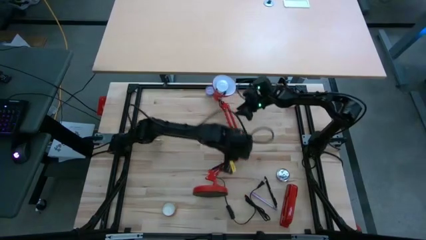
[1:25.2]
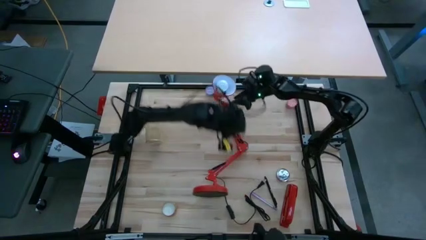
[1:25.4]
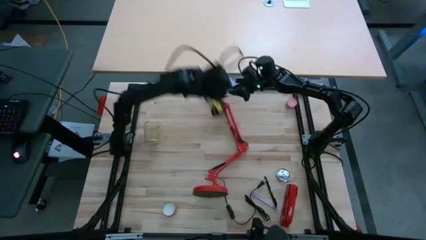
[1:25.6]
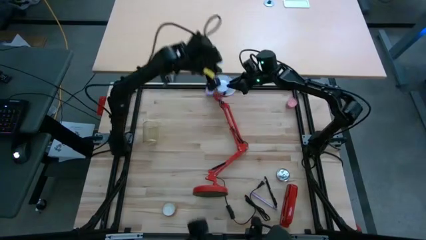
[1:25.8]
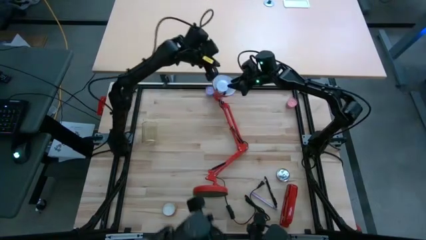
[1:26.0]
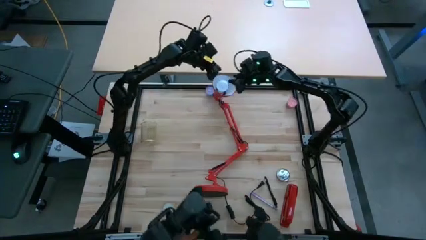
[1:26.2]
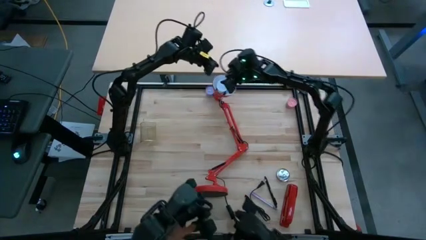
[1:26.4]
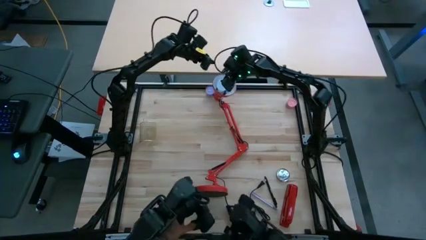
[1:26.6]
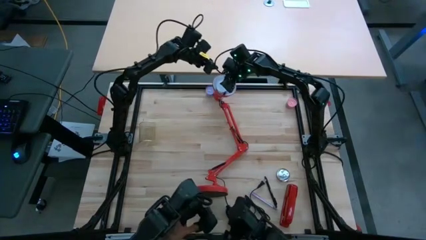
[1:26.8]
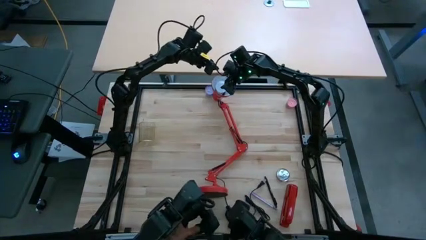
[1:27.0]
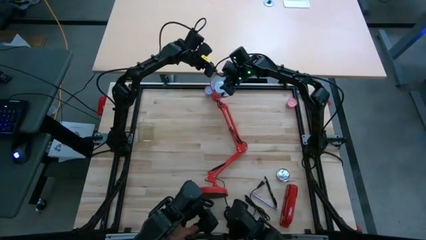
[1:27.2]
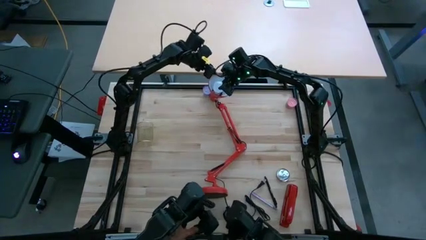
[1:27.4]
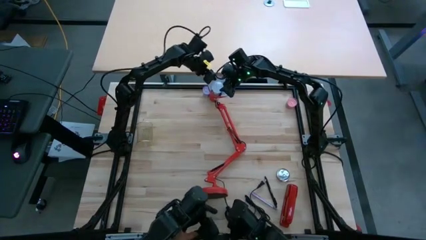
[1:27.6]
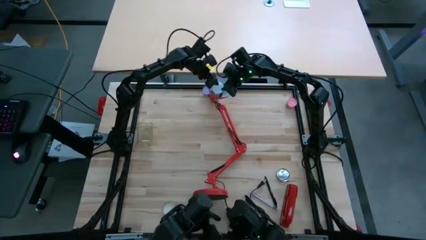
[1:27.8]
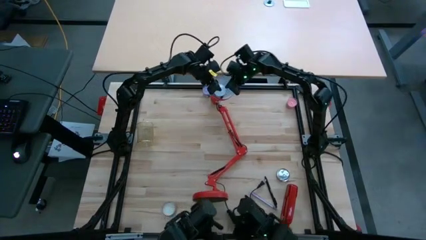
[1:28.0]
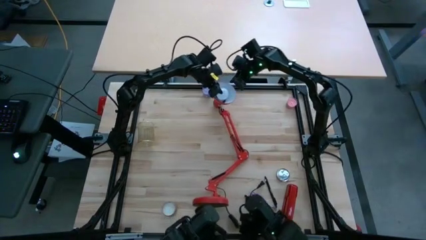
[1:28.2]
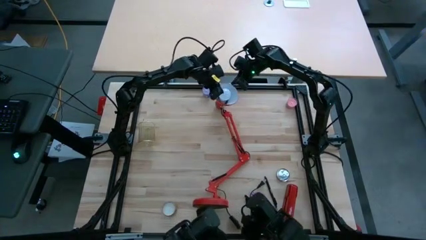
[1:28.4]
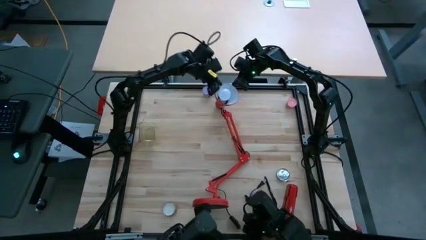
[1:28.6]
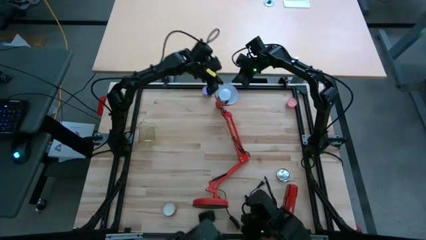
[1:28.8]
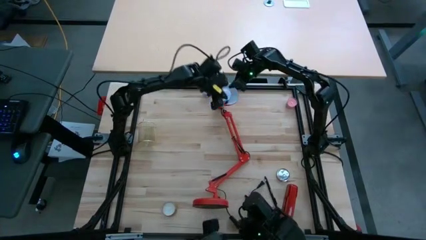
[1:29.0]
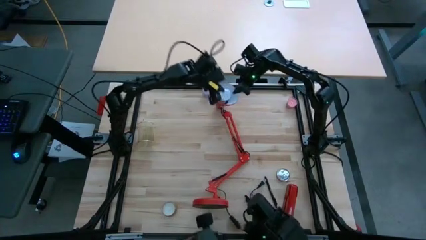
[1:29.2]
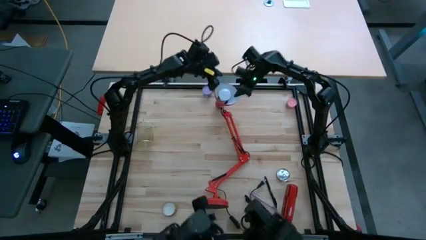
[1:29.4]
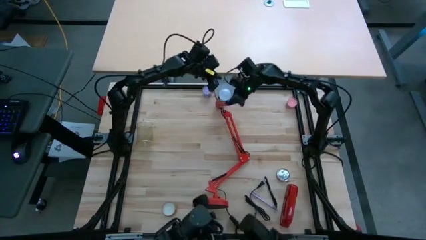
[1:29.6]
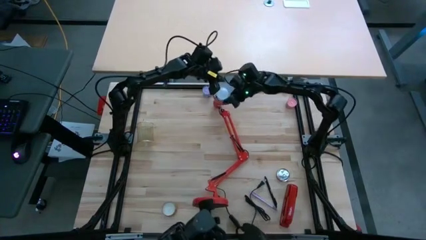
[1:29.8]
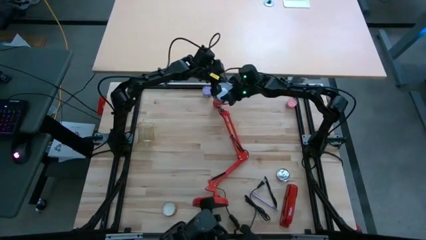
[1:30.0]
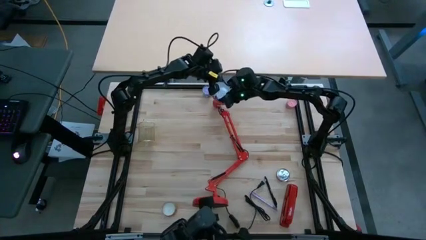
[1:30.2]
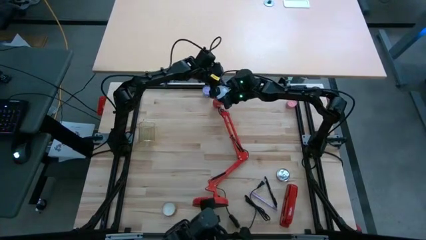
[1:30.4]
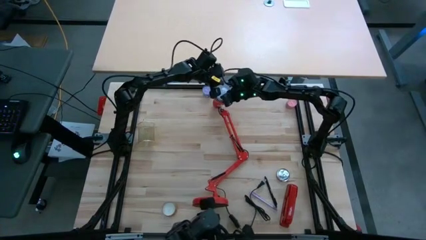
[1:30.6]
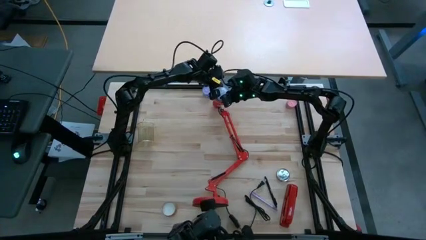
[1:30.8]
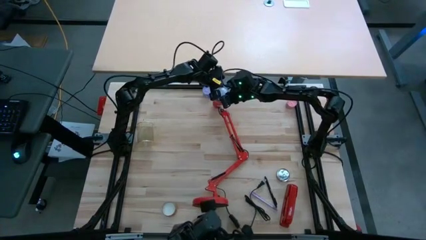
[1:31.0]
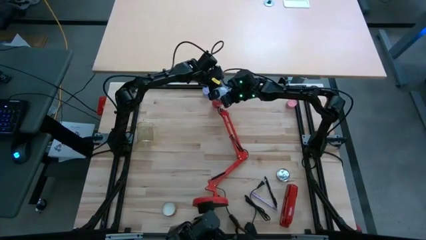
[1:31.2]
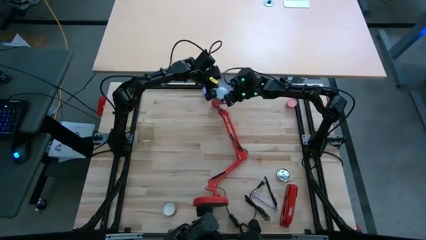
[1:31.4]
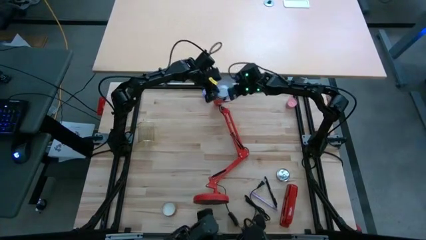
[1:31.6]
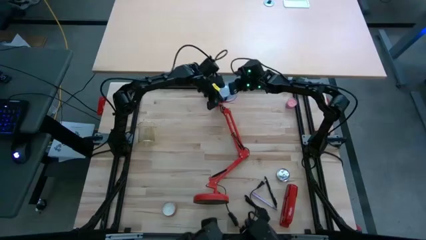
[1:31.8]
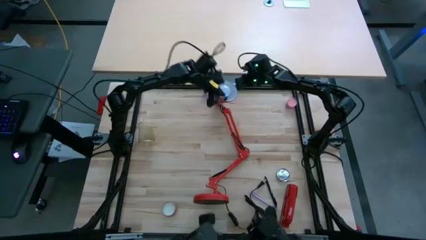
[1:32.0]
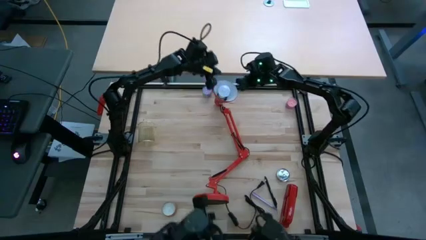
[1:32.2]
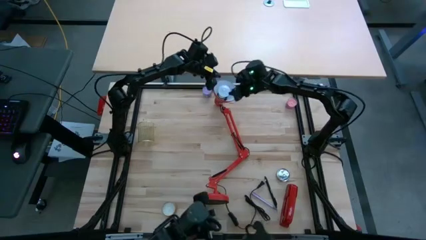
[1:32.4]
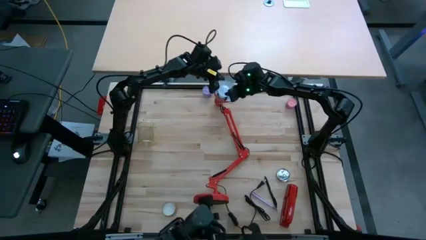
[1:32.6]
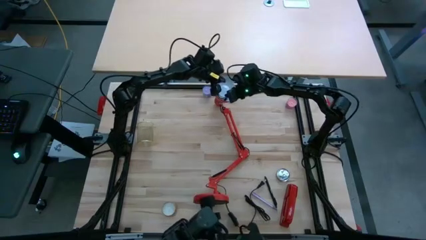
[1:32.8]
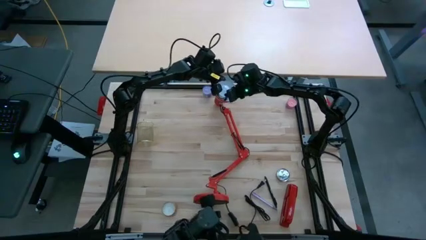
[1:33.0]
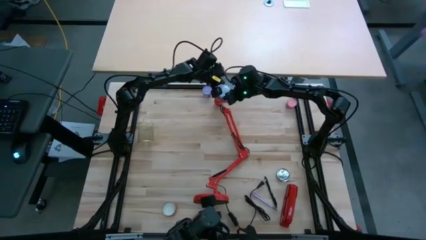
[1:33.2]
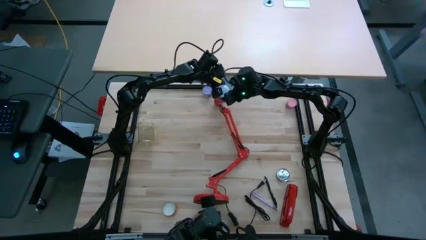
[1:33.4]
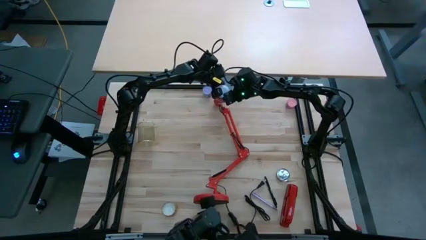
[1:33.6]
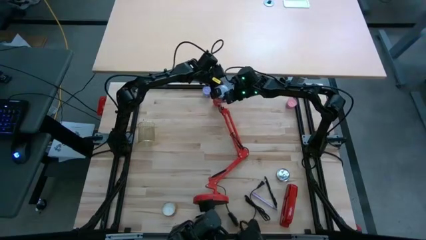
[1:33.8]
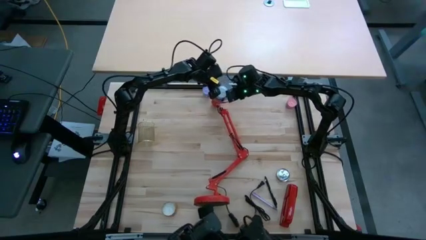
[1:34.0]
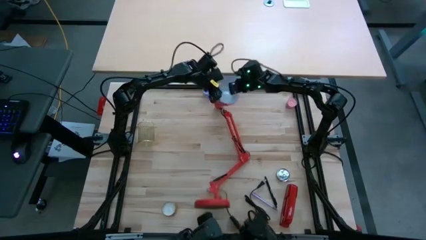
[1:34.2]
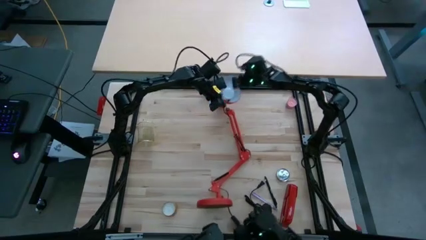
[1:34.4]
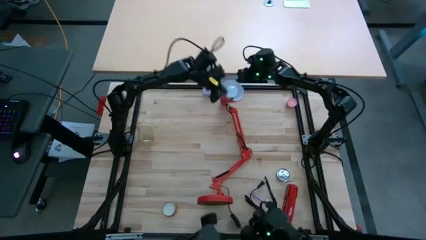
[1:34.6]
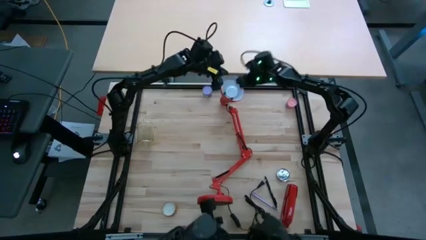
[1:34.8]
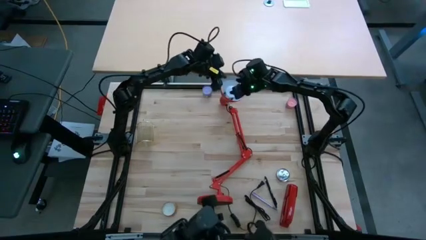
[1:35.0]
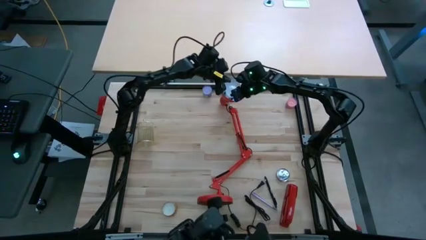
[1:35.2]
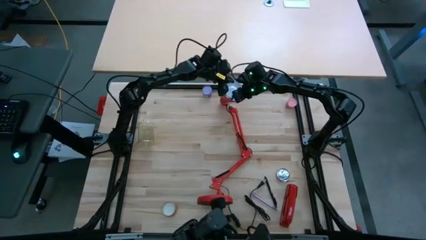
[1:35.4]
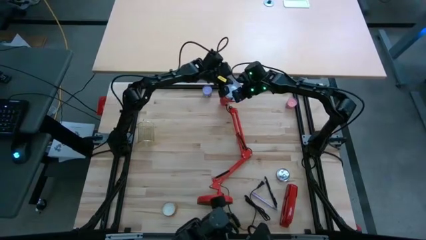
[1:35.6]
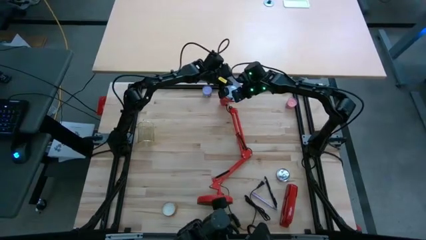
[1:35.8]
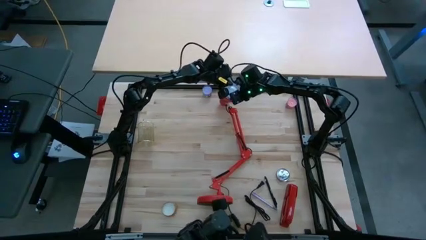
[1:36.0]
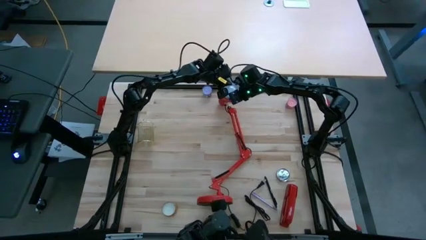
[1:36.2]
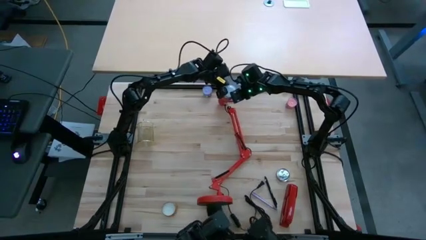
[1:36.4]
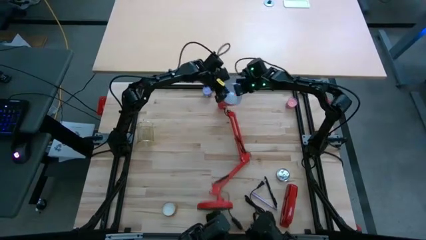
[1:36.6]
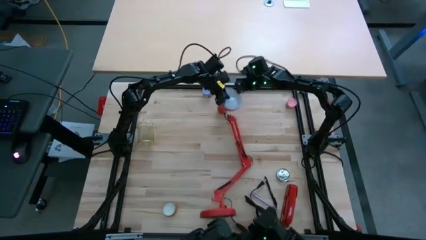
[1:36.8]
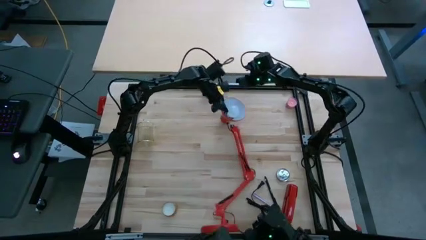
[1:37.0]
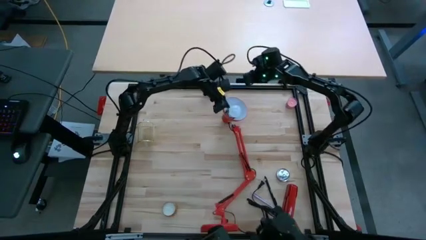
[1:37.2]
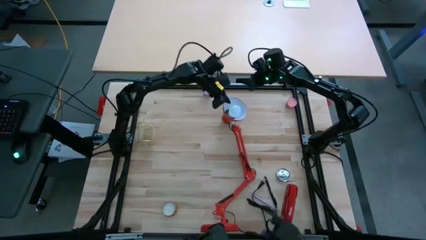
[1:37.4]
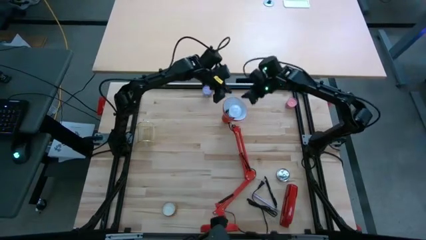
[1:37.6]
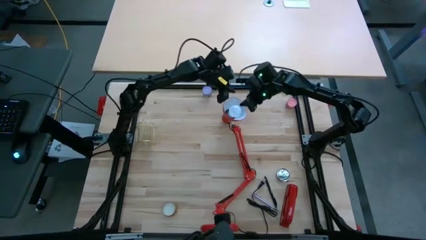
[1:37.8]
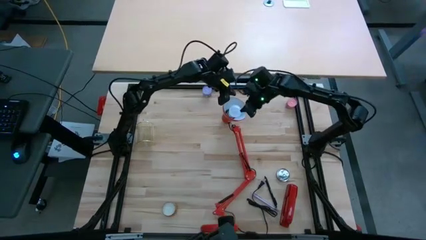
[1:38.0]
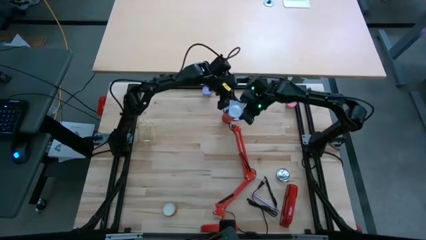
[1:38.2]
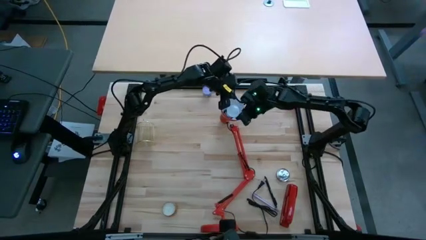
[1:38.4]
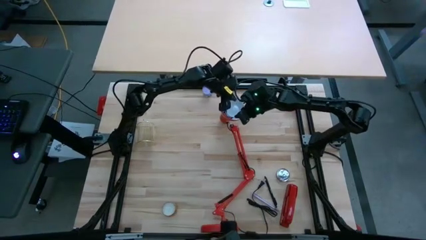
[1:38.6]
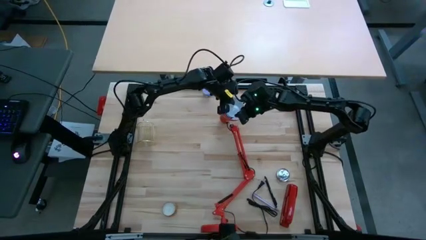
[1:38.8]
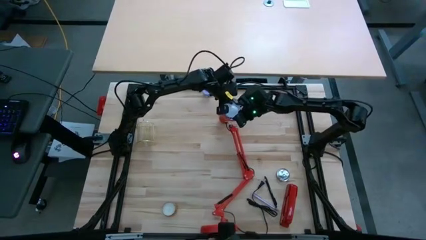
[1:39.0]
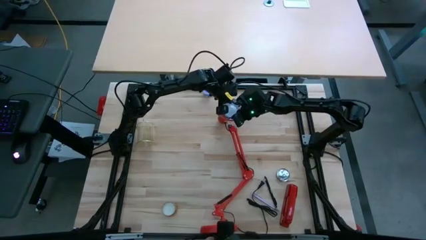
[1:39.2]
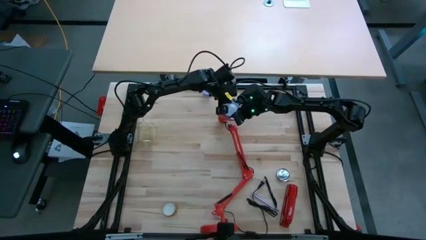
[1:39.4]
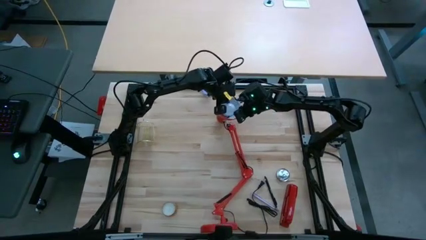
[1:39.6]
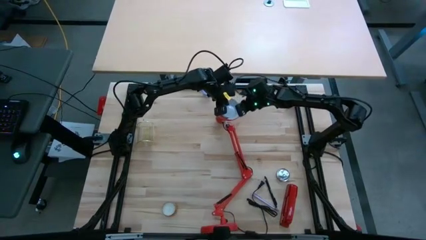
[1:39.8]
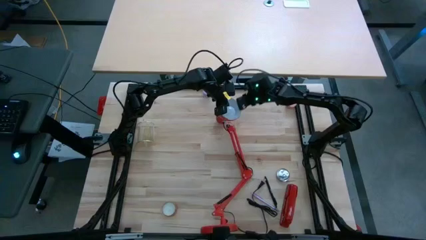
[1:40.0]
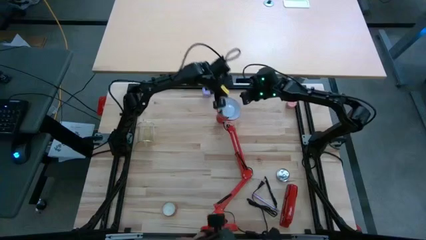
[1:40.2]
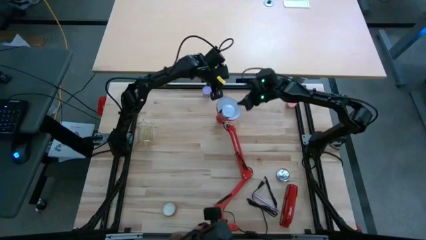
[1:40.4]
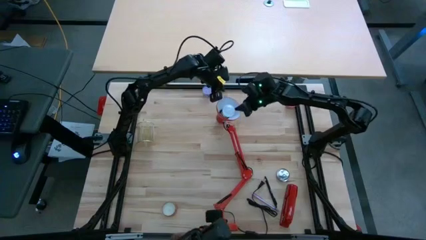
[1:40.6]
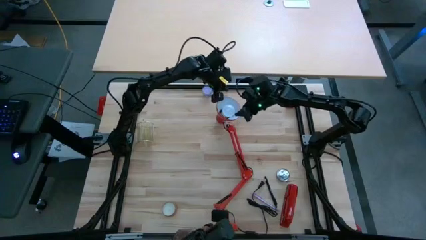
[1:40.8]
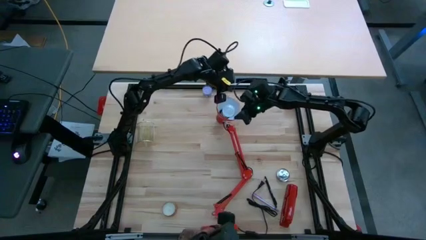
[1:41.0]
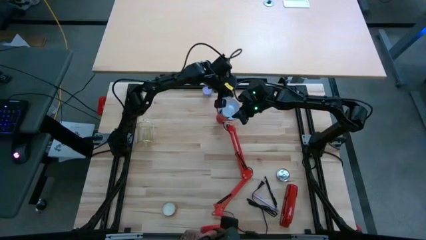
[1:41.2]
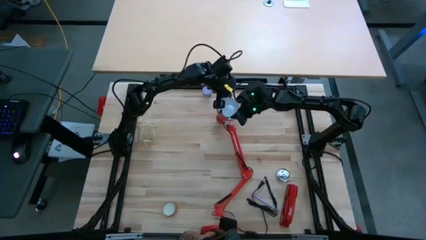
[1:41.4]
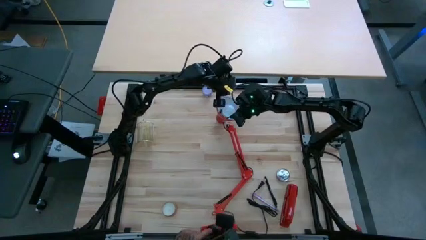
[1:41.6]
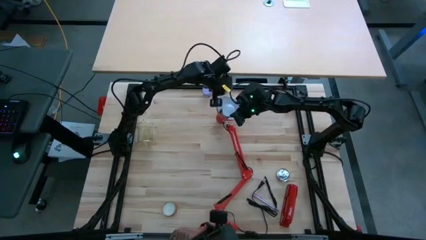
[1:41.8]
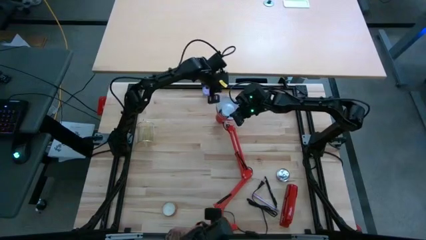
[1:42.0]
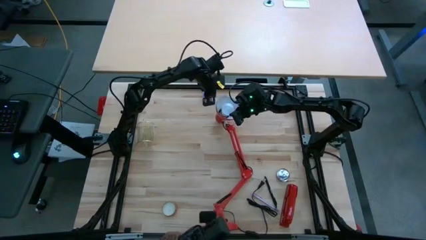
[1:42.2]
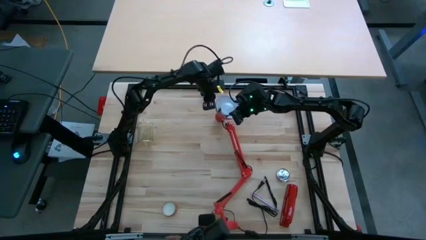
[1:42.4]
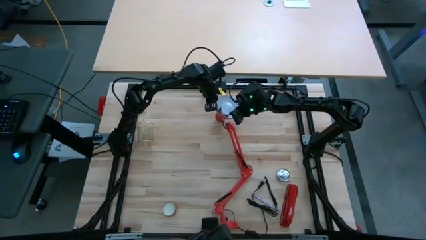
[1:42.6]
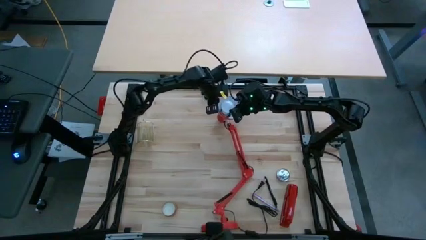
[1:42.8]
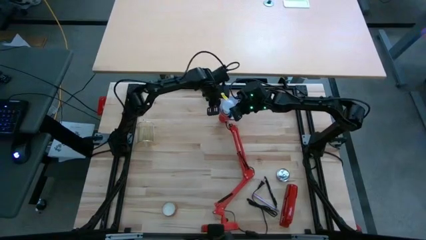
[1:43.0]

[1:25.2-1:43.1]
Task: Screw lightbulb
Remove the white lightbulb from the desk lamp
